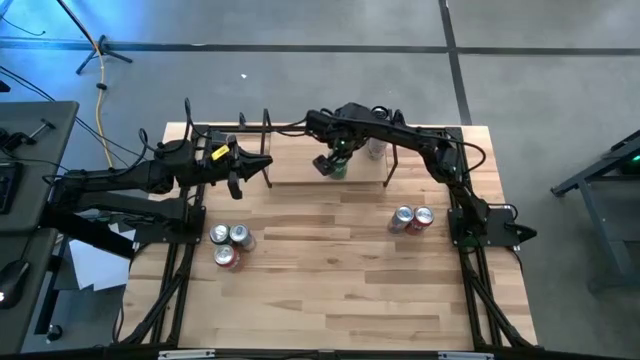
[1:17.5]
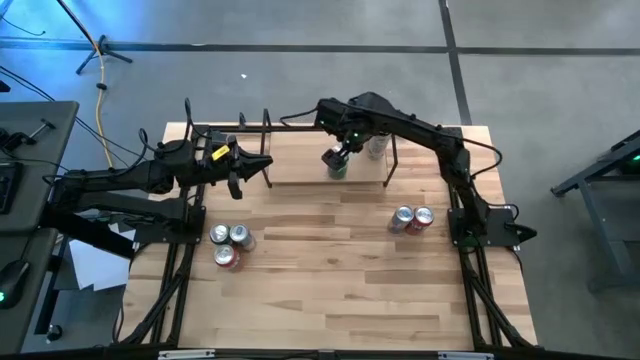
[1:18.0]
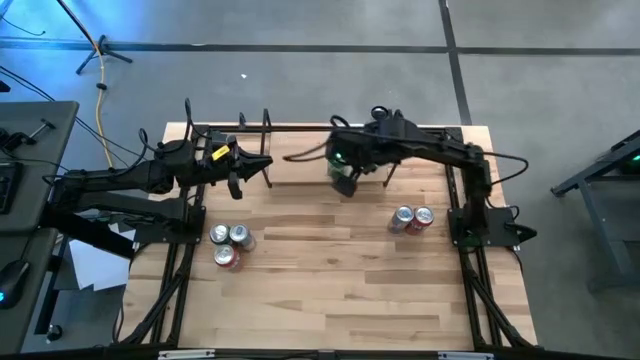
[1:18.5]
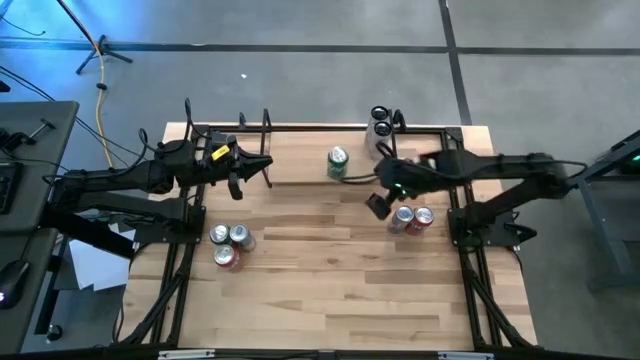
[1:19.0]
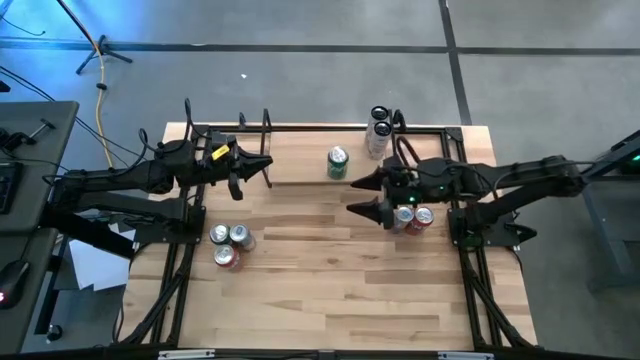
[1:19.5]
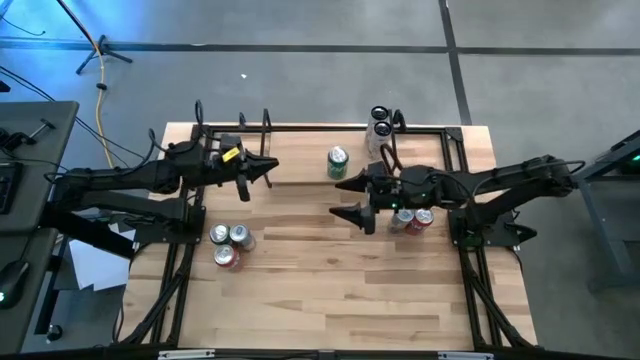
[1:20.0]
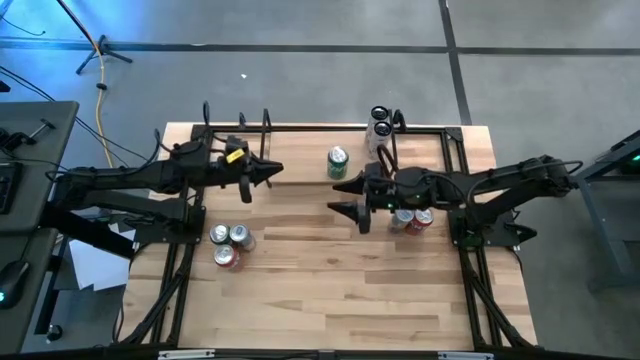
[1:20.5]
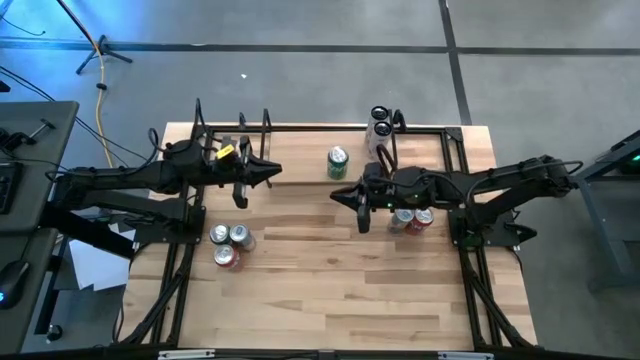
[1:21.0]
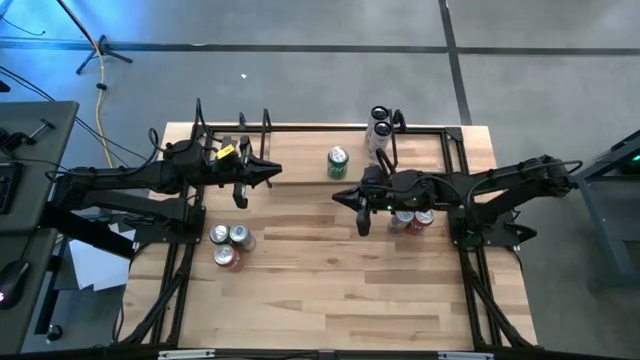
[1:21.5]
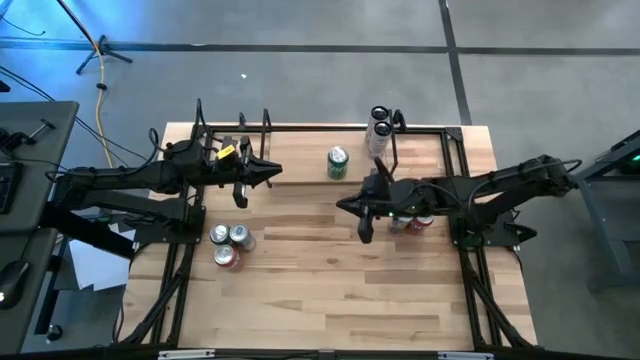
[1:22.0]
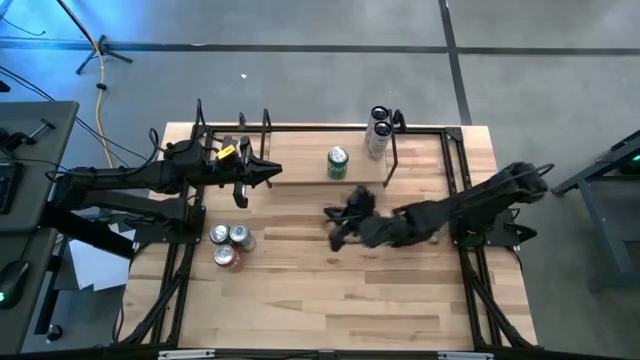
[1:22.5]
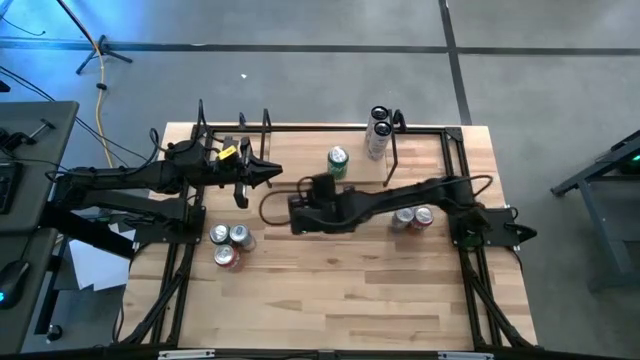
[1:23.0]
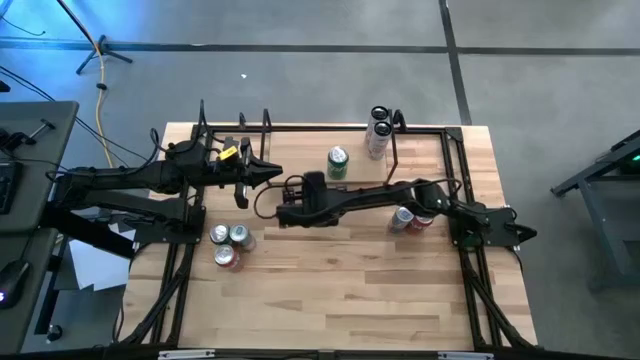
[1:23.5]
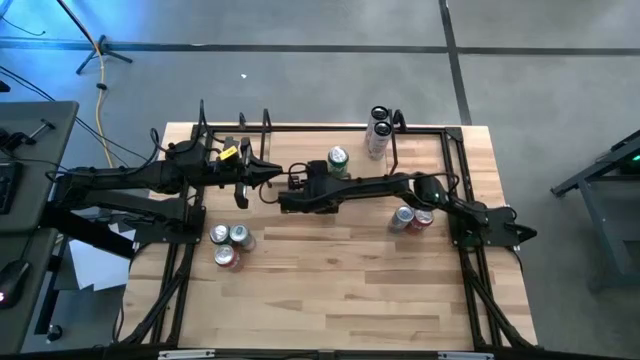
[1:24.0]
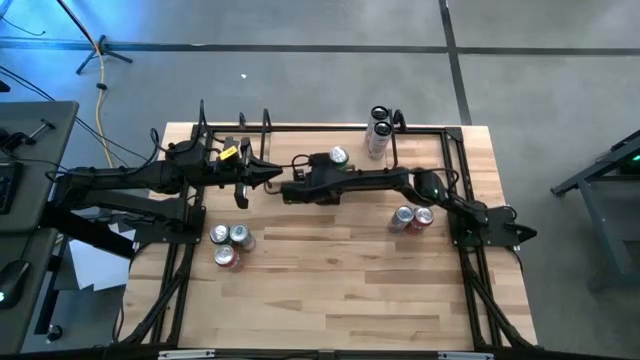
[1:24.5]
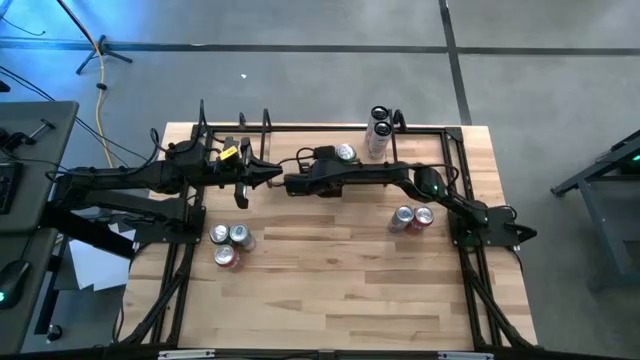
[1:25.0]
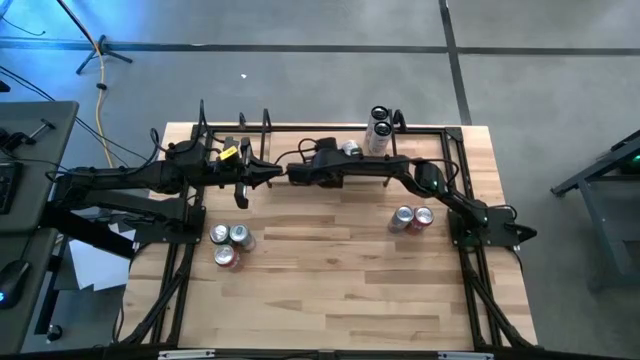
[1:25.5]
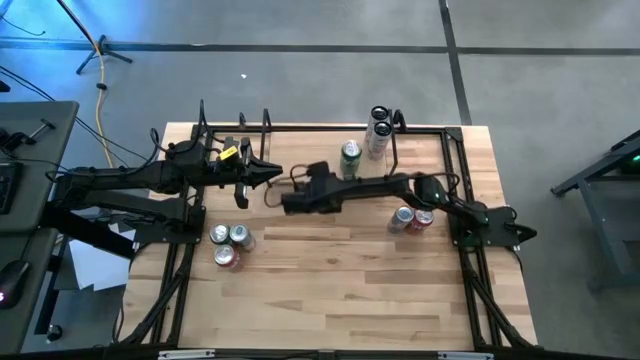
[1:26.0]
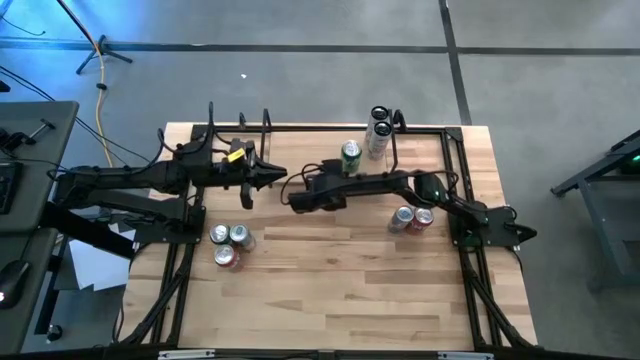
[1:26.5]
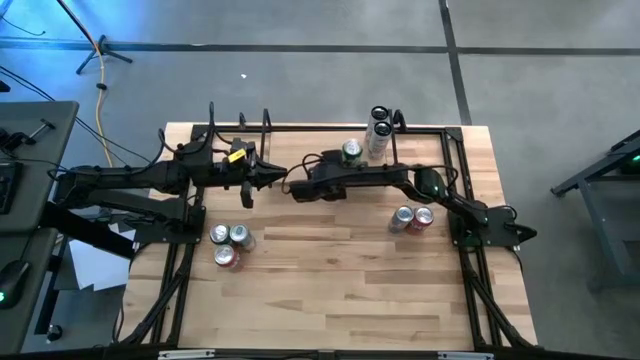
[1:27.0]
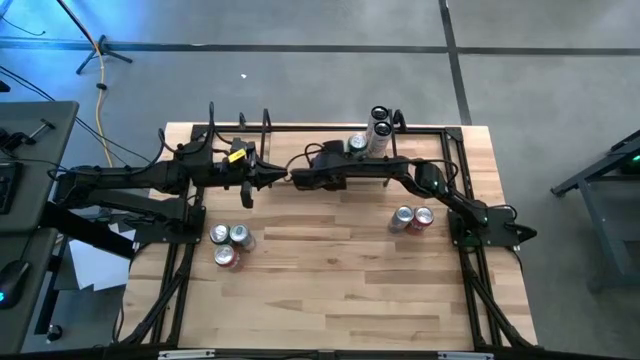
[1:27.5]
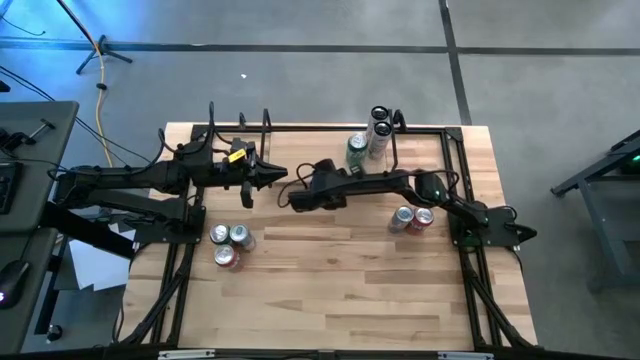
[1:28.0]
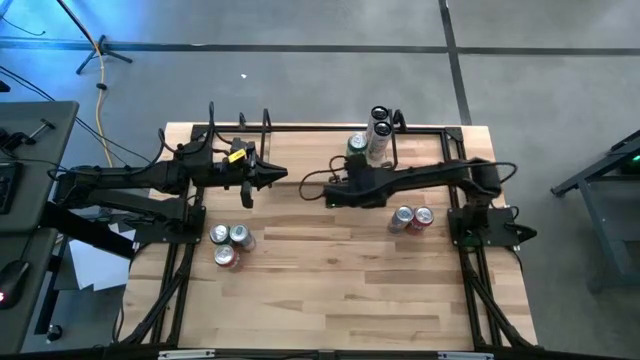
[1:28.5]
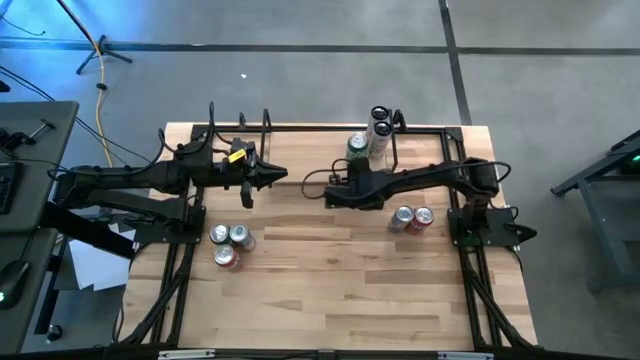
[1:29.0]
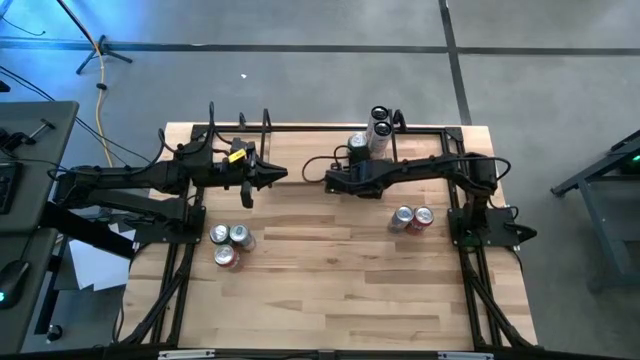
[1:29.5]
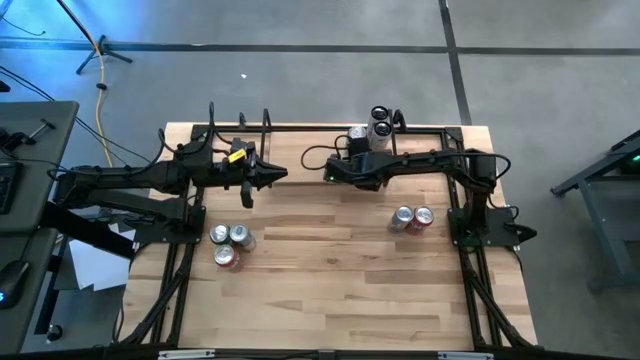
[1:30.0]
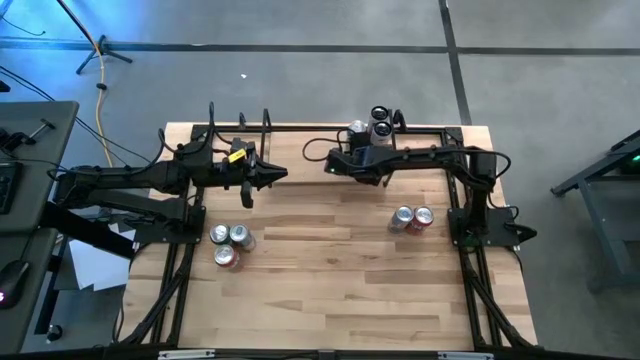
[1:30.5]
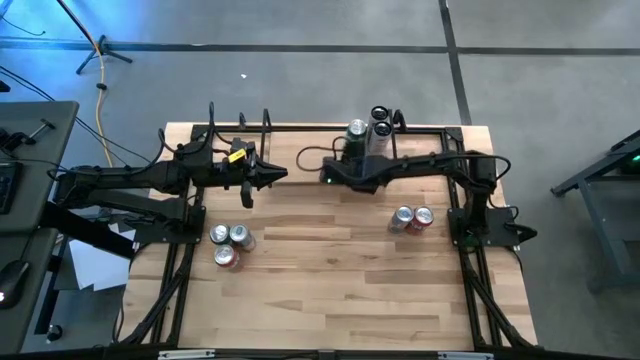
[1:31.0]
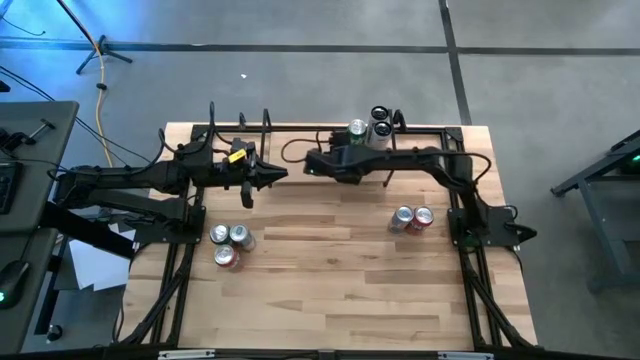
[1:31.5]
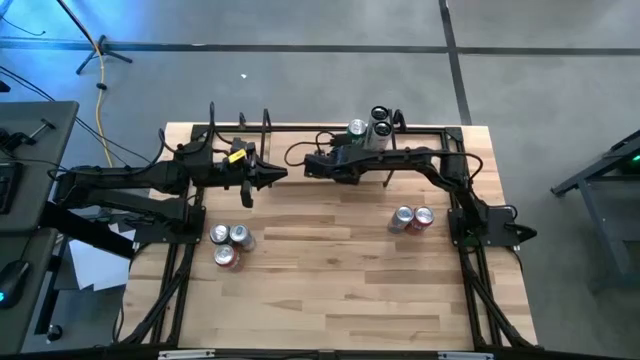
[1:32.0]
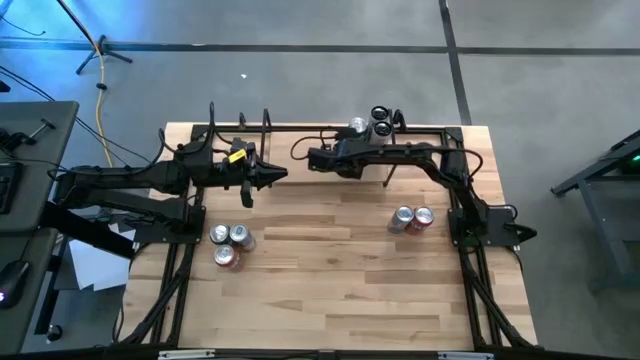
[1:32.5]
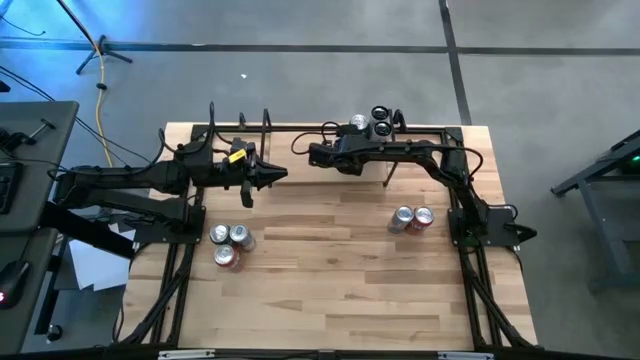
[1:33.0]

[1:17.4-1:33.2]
Task: Place canned beverage on shelf
Put the green soda can on the shelf and align it with the other green soda can

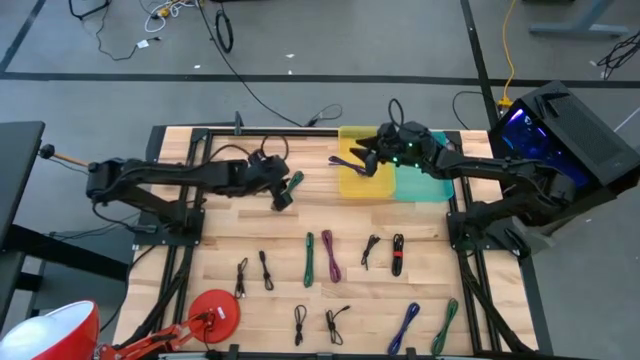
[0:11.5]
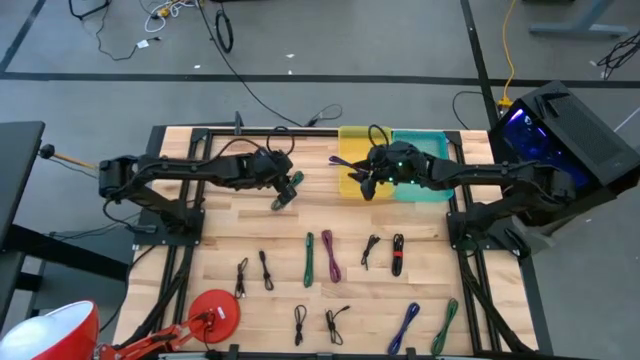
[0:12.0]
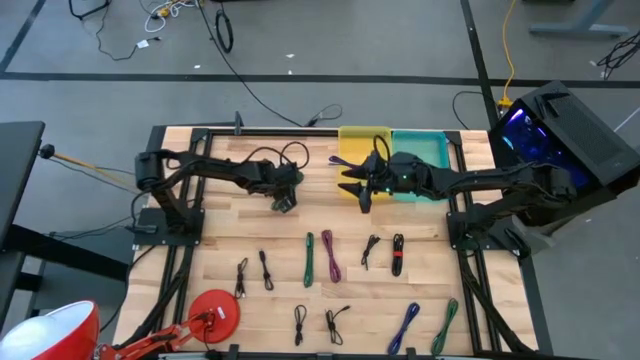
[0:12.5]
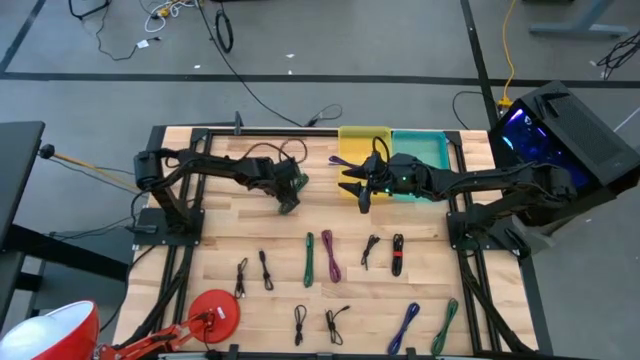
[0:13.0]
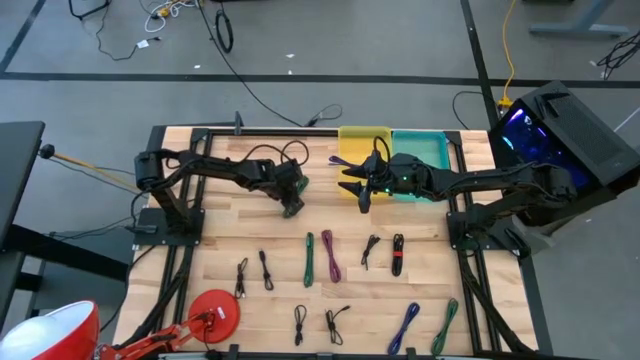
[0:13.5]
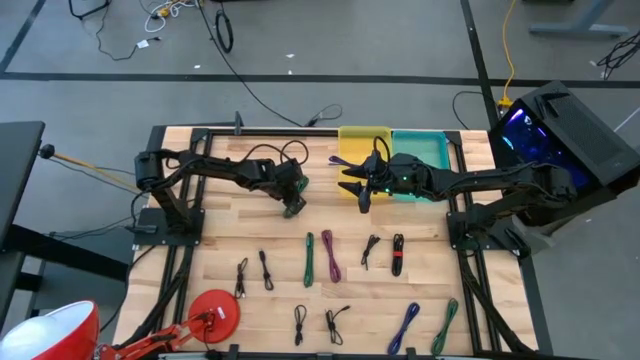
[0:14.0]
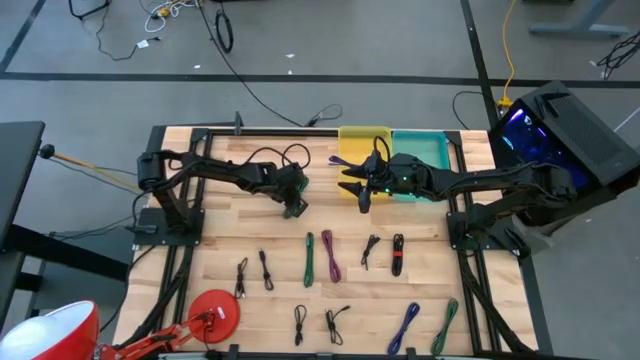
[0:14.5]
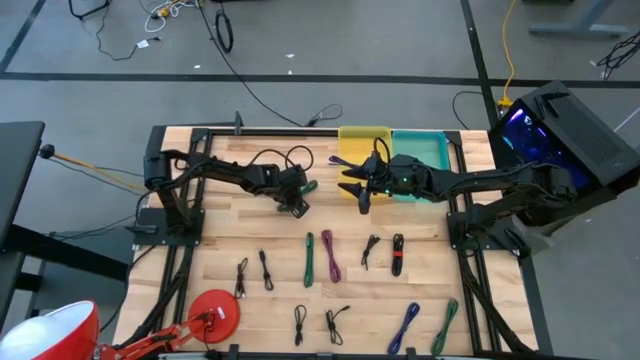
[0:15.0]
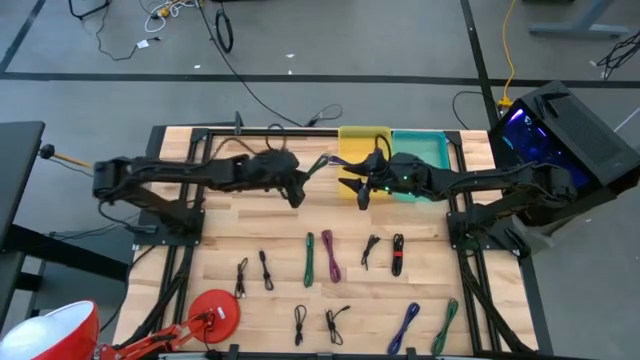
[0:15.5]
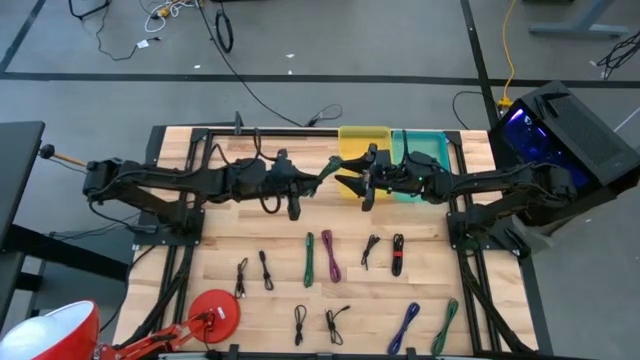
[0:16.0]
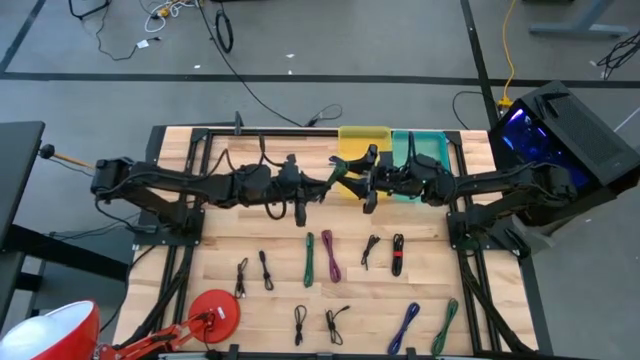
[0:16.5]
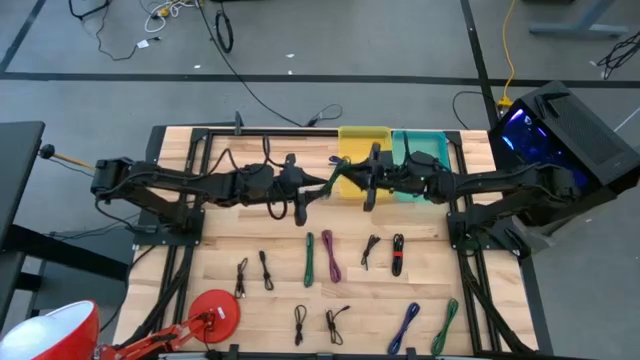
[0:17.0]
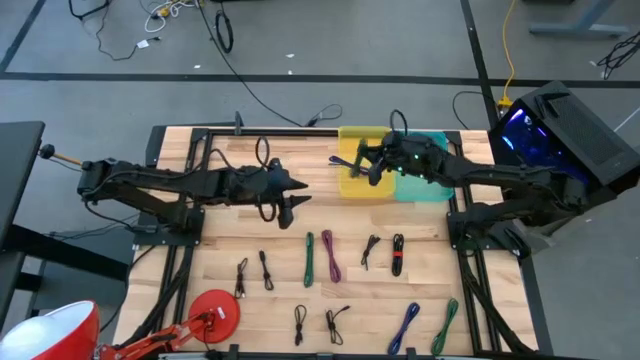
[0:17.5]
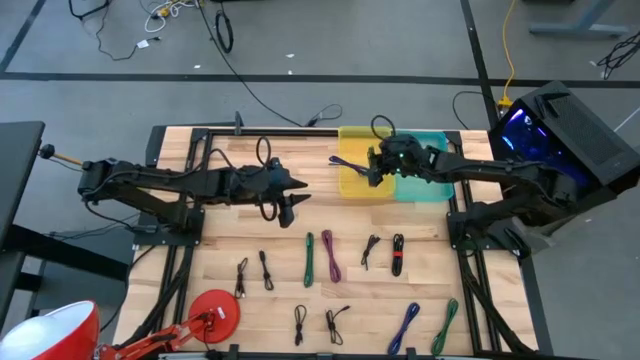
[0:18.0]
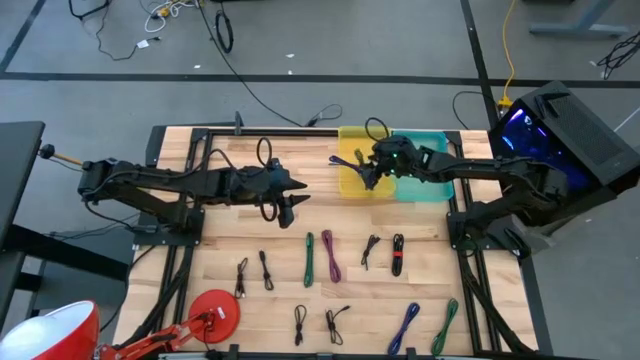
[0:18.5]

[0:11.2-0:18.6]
Task: Pick & Place USB Port
Put the top left green charger cable into the yellow bin
